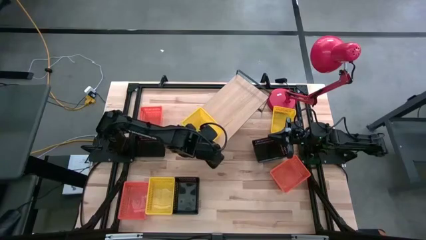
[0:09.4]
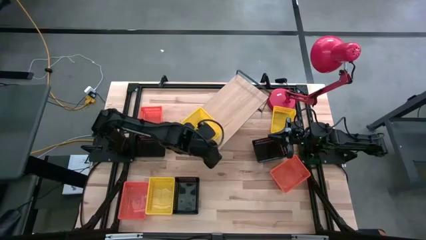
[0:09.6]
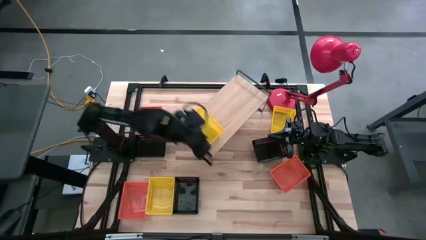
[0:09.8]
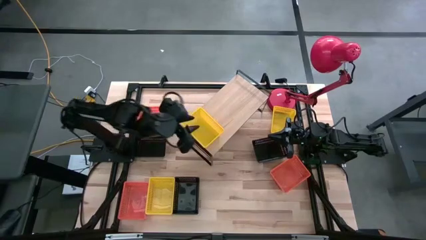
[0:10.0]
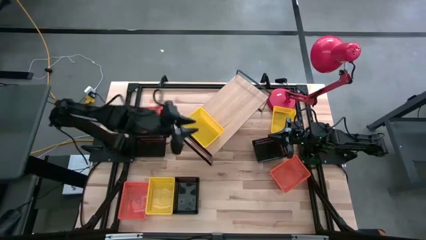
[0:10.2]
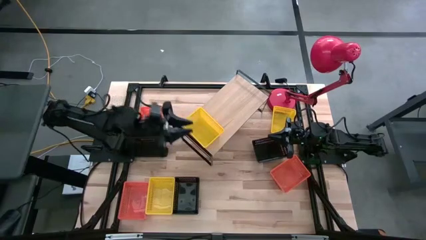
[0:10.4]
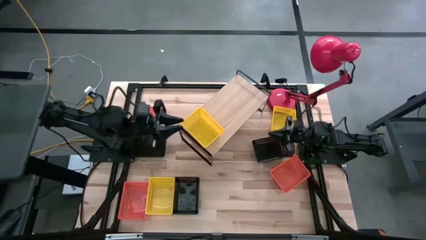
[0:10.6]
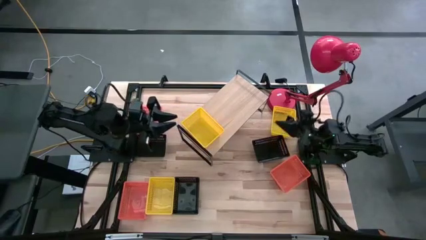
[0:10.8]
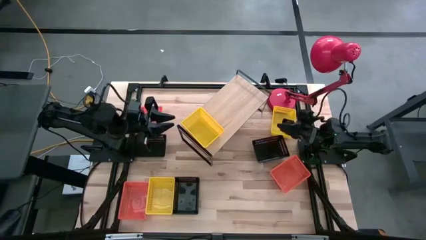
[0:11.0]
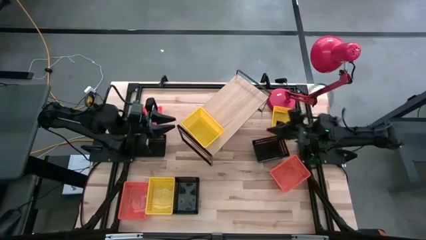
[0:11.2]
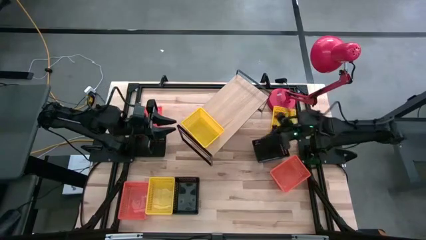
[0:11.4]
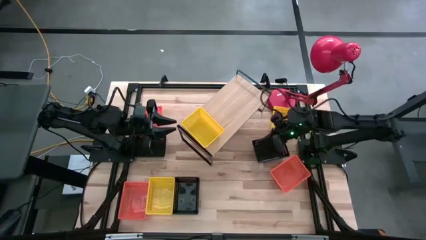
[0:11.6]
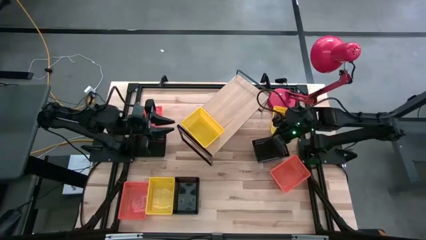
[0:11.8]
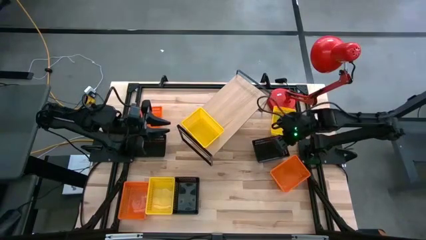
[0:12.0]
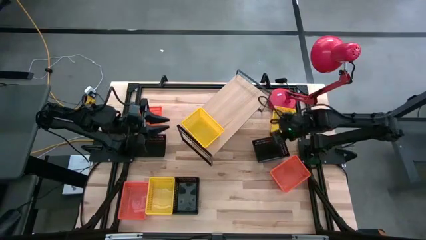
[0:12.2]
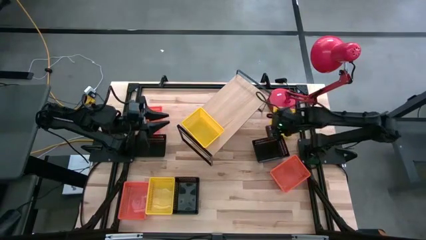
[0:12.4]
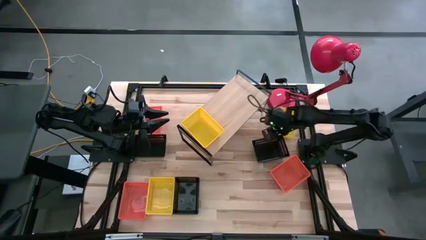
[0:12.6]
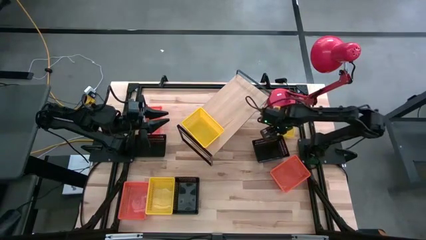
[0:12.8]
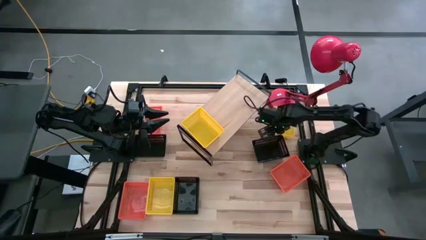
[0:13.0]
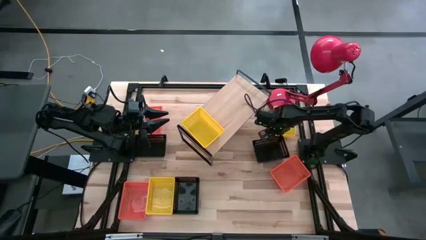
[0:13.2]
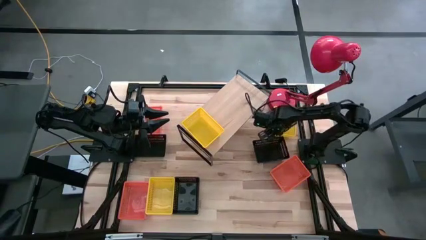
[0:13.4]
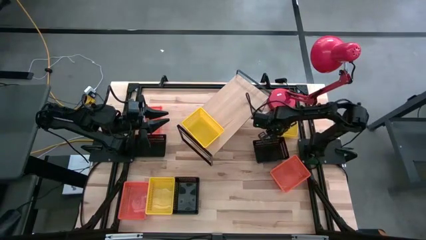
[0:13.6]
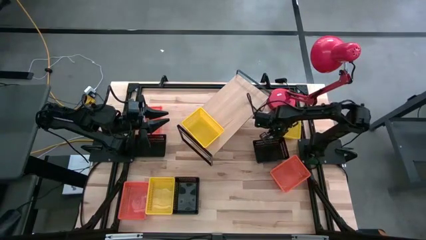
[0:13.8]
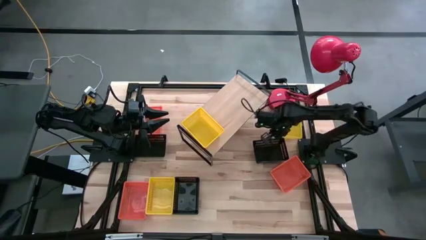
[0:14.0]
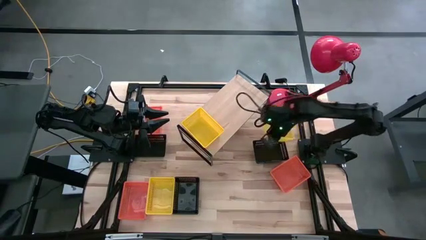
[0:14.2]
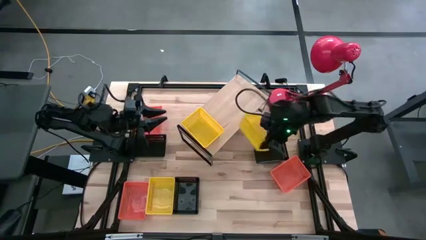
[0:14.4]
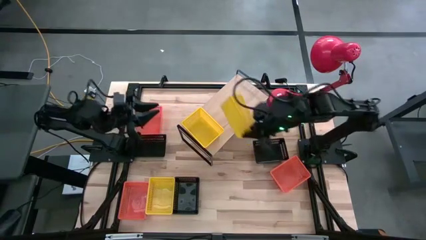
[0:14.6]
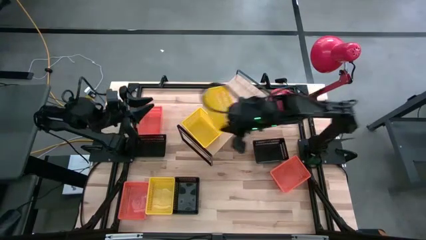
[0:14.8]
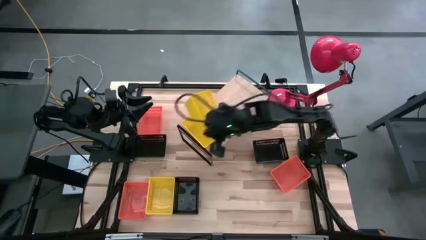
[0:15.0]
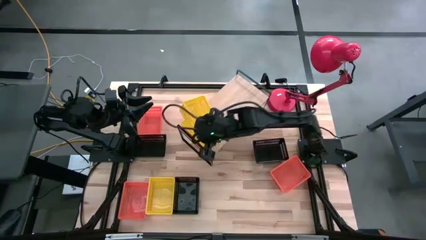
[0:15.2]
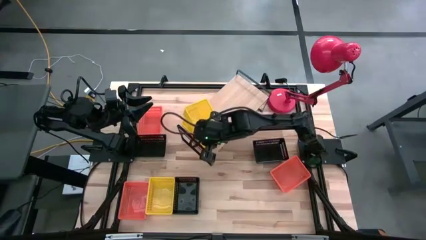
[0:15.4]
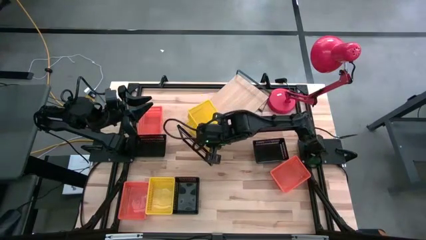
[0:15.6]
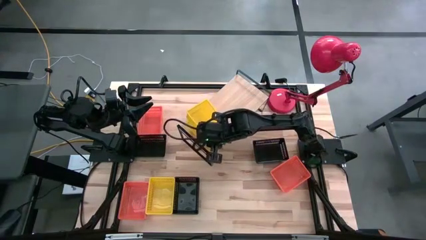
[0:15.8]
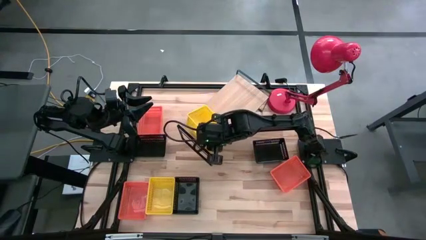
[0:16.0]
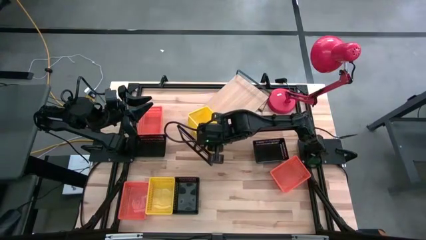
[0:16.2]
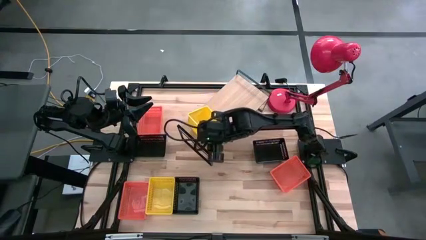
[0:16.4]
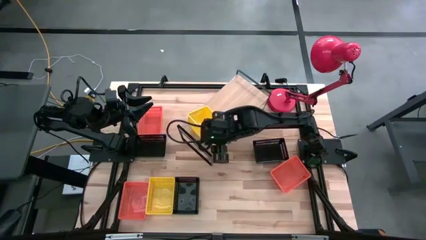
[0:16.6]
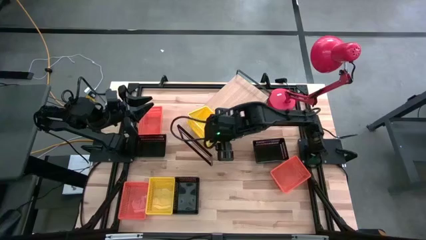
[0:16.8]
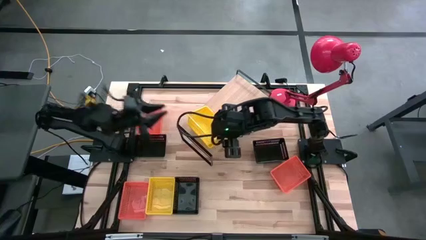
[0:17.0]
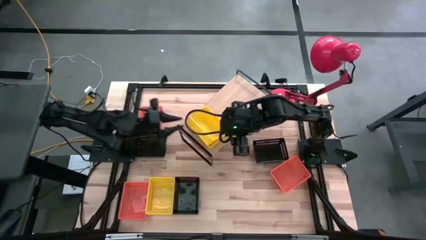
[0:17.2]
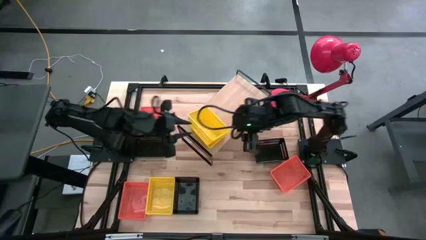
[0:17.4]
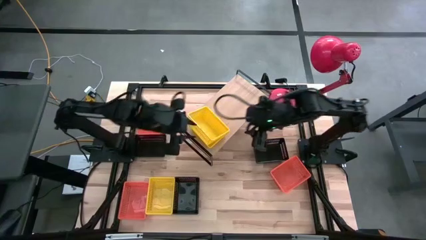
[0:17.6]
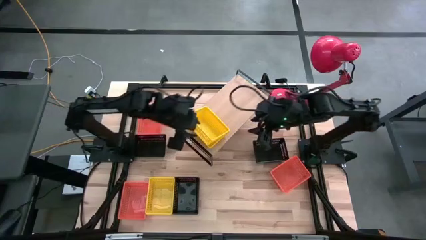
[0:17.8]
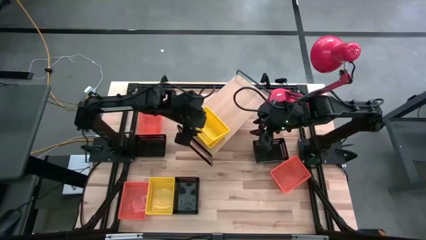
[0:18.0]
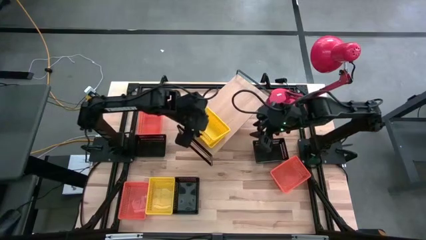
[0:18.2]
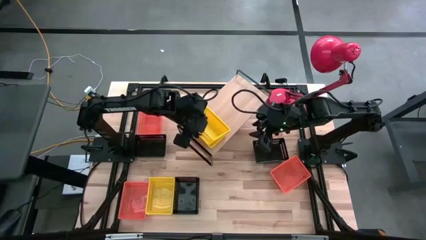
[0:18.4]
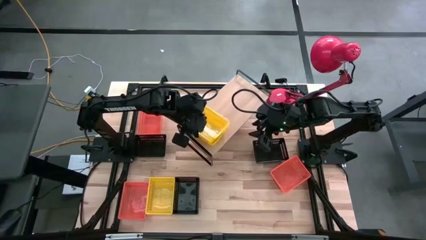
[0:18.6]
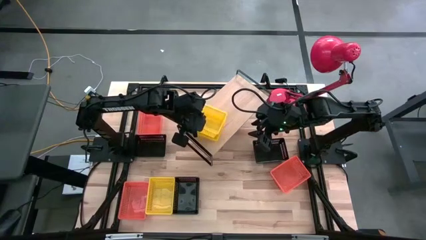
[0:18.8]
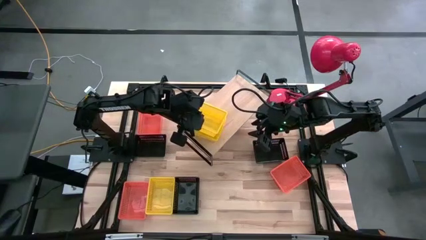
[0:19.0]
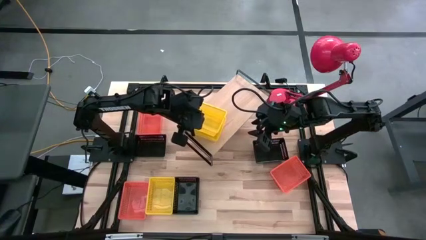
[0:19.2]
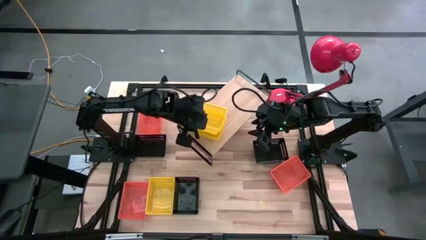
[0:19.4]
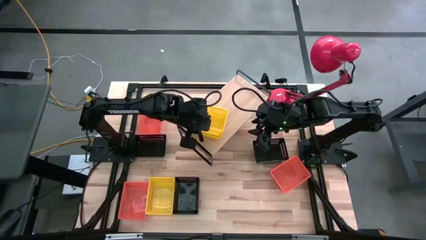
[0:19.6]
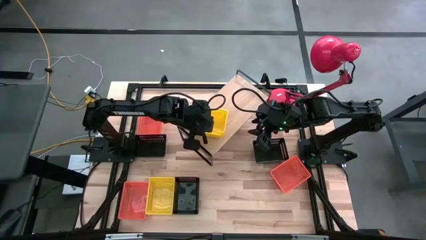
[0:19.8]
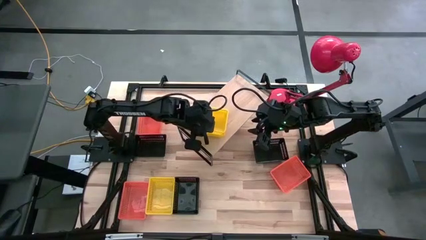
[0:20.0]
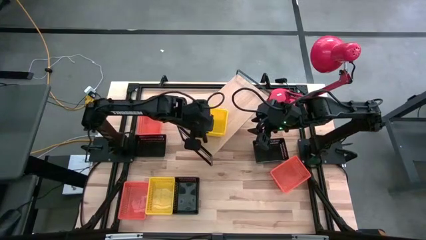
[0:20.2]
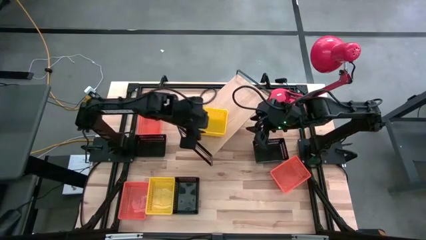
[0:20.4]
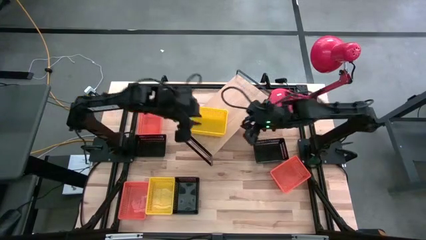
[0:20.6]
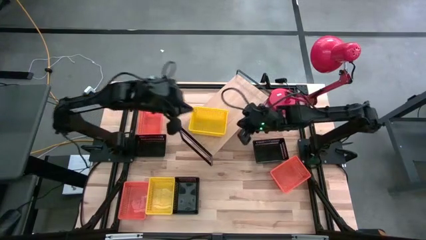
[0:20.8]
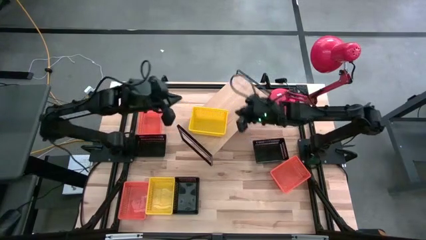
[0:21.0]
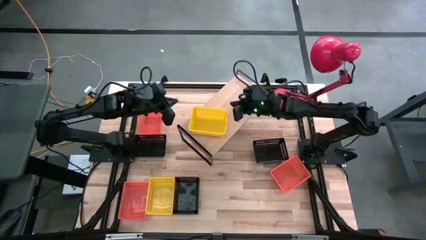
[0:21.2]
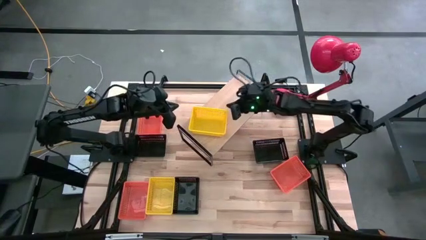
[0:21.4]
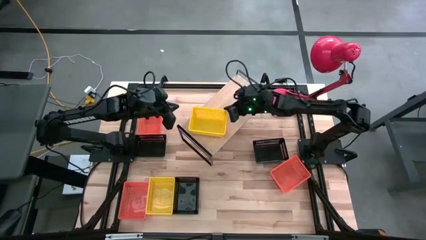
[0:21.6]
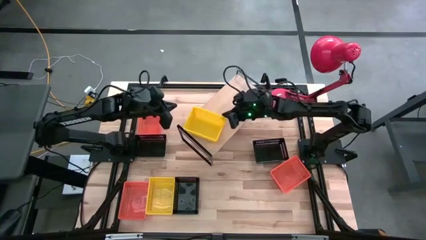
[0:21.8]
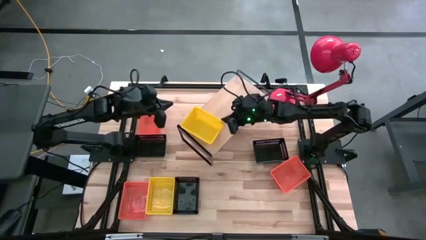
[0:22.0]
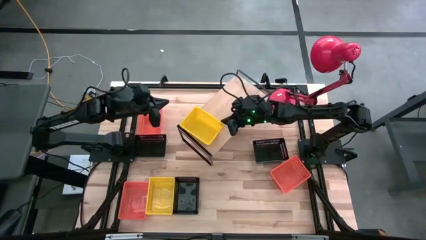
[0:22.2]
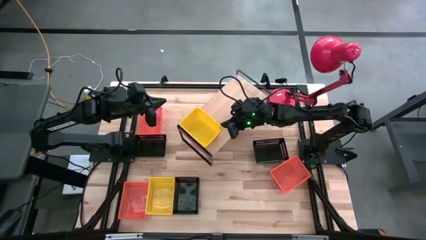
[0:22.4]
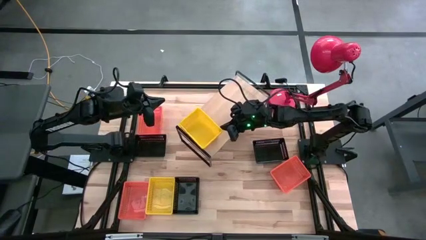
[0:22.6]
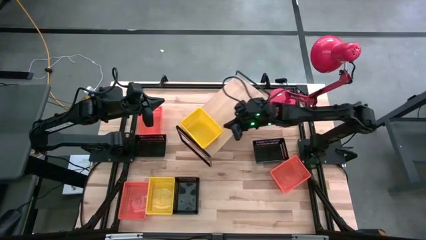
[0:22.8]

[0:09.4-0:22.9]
Task: Stack baskets on shelf by color
Stack the top yellow bin on top of the yellow bin on the shelf

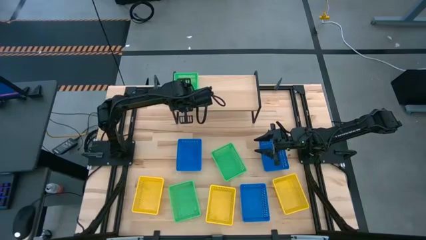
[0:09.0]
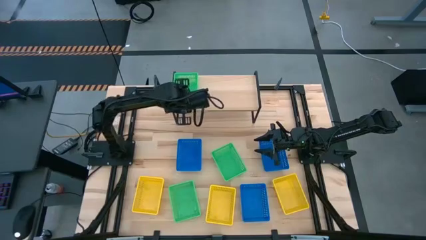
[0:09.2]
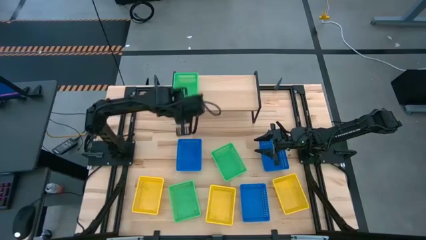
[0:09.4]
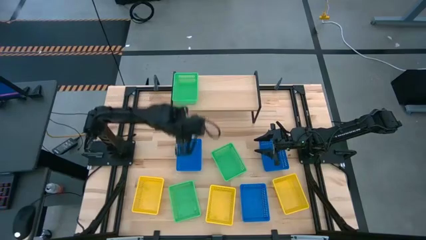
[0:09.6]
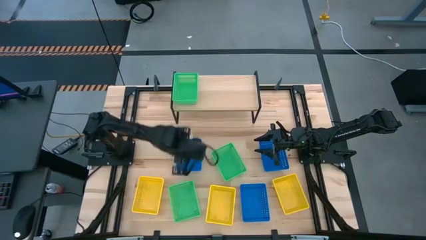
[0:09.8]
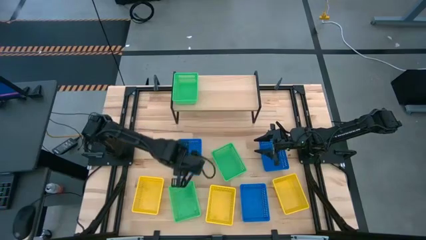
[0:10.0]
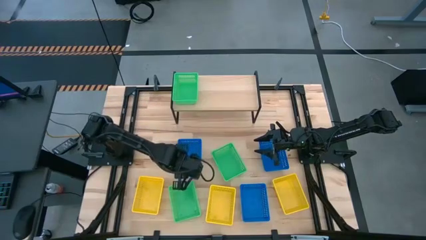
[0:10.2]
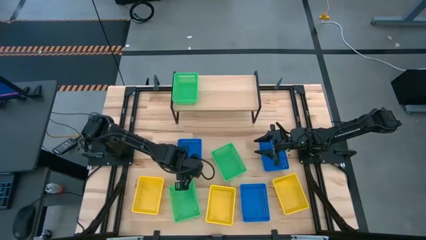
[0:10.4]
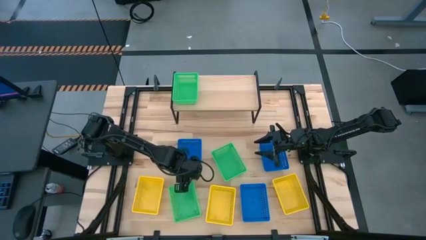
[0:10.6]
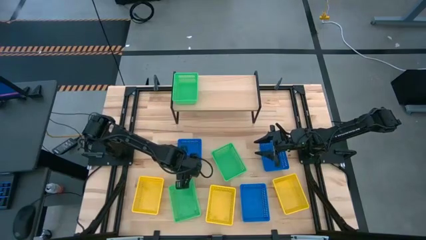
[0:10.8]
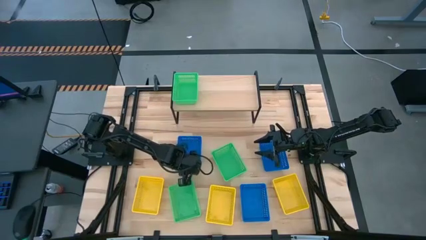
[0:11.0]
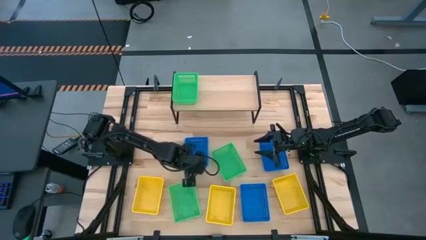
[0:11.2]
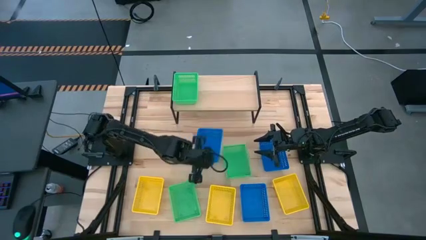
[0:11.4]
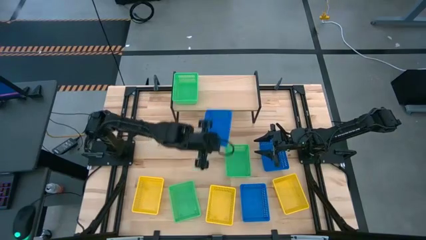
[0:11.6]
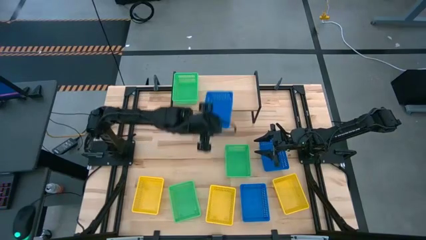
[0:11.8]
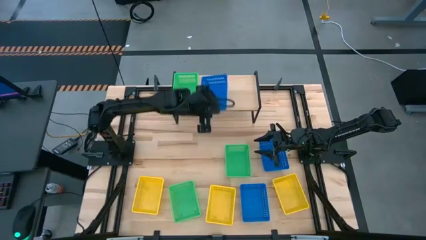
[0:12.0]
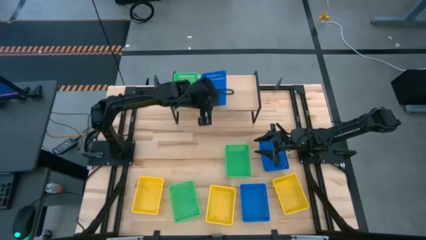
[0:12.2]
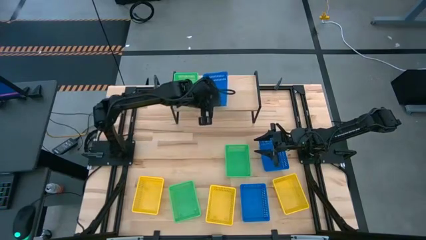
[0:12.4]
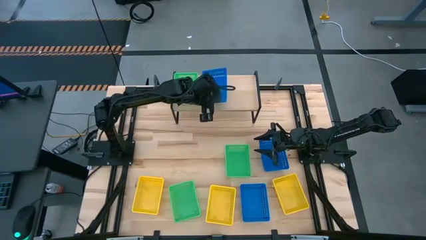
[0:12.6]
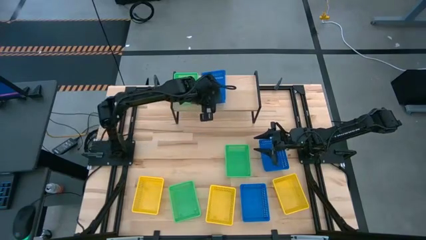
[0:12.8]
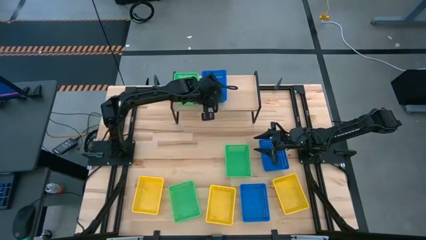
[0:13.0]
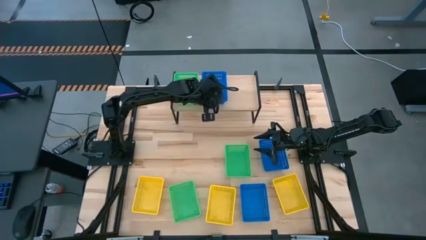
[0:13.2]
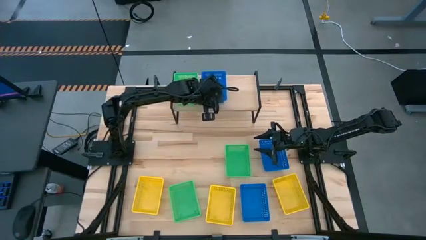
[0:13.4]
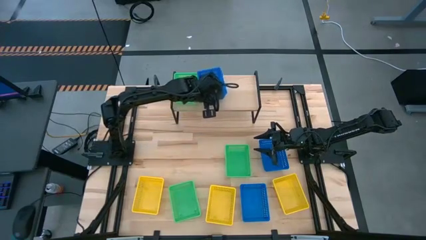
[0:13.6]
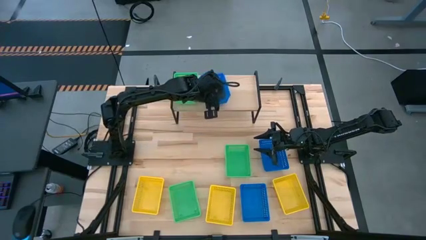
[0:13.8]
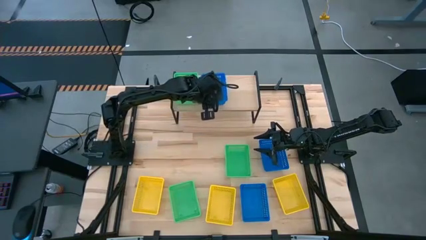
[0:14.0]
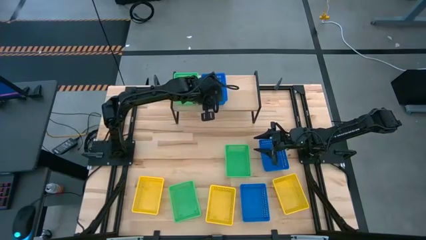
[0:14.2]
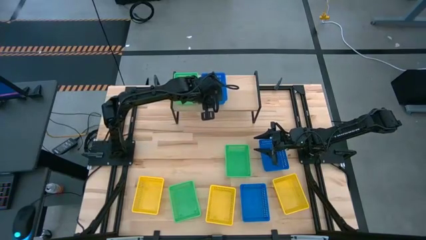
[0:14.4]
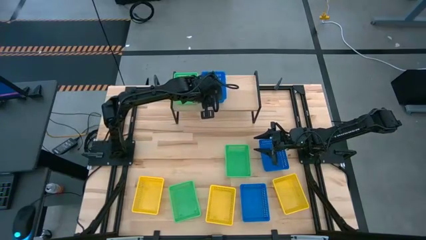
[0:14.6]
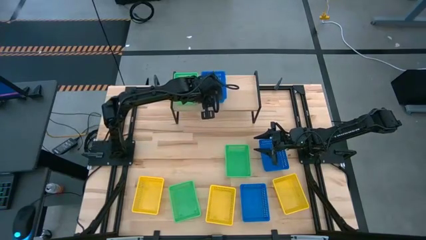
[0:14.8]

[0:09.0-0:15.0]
Task: Stack baskets on shelf by color
Put the top left blue bin on the shelf
